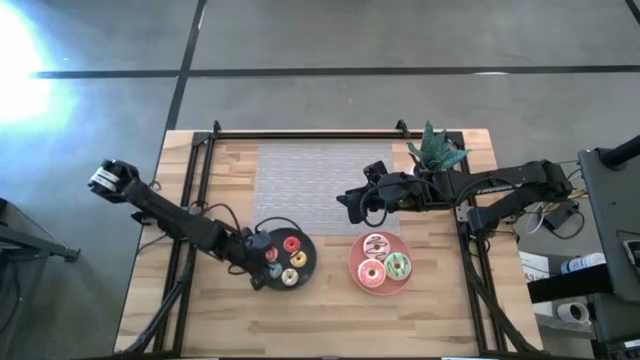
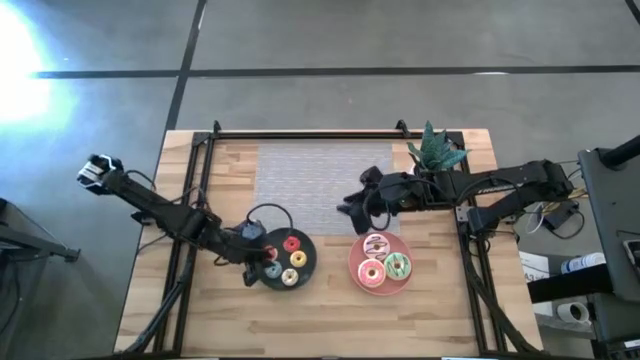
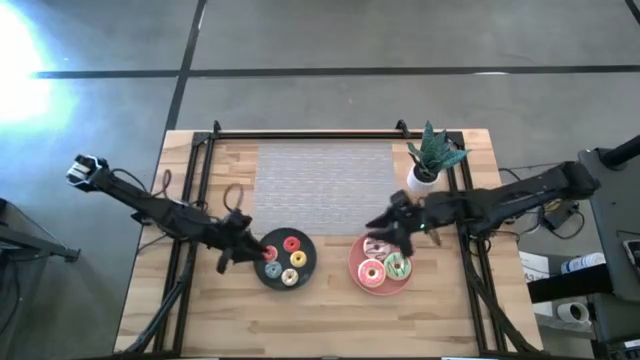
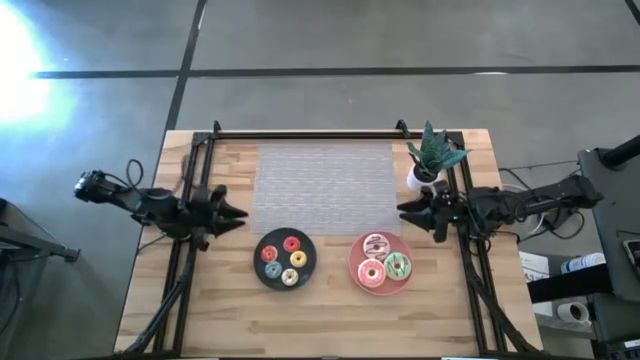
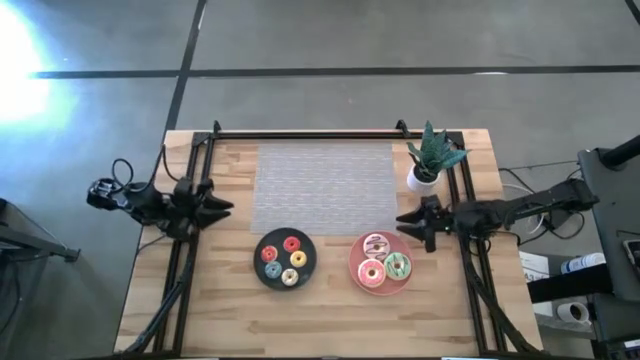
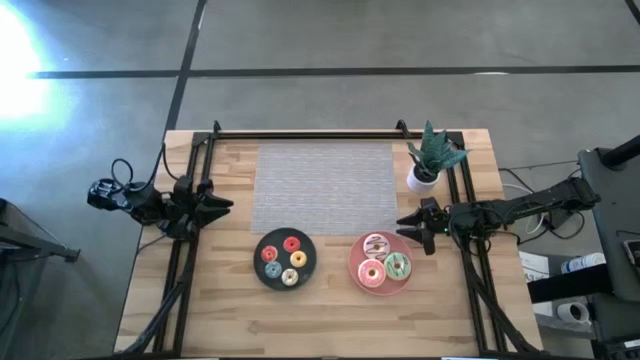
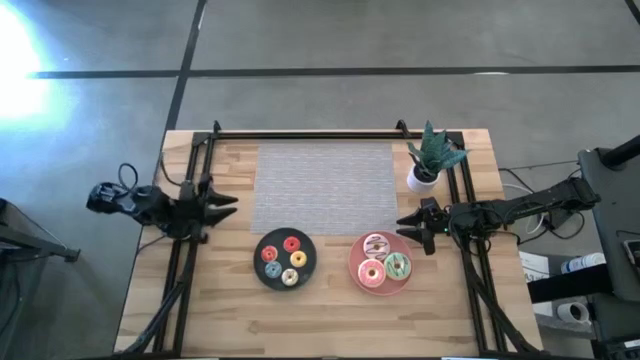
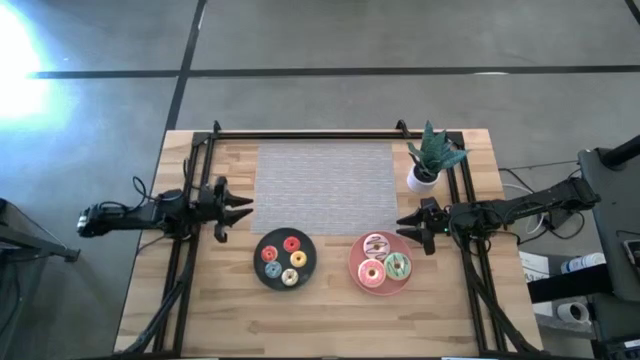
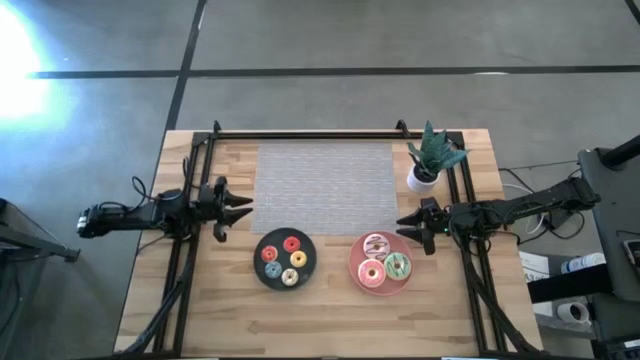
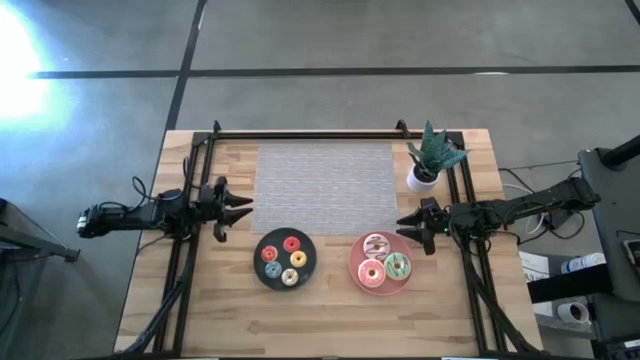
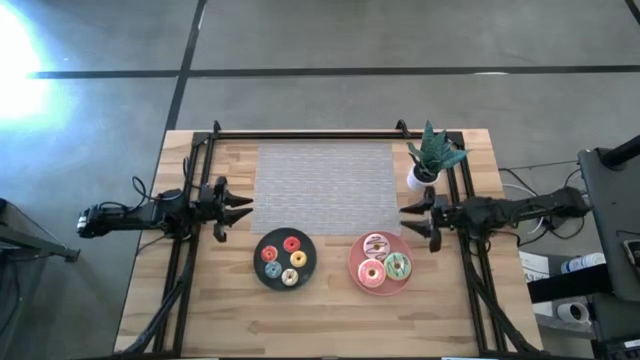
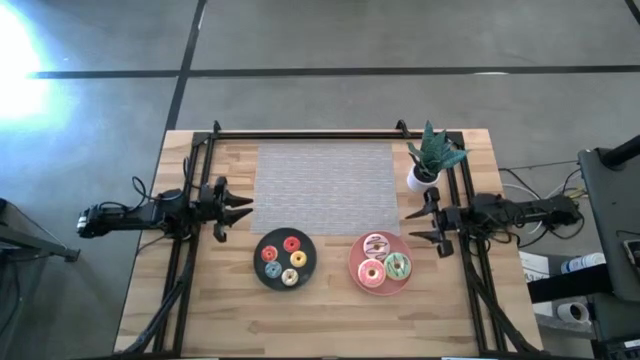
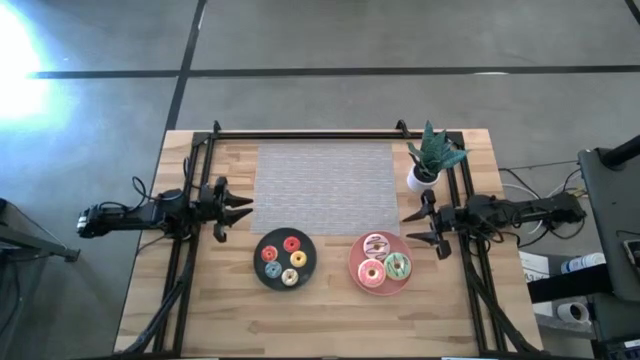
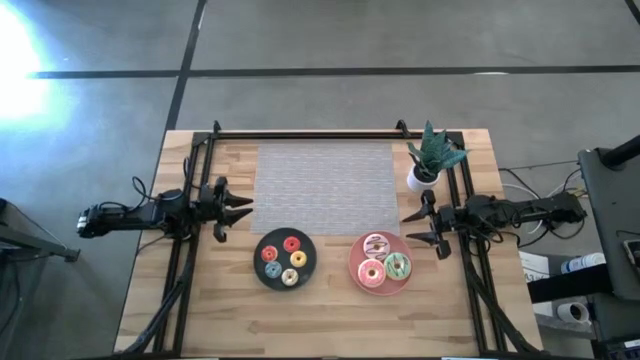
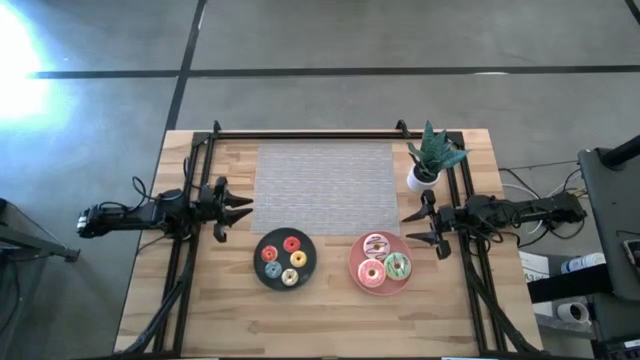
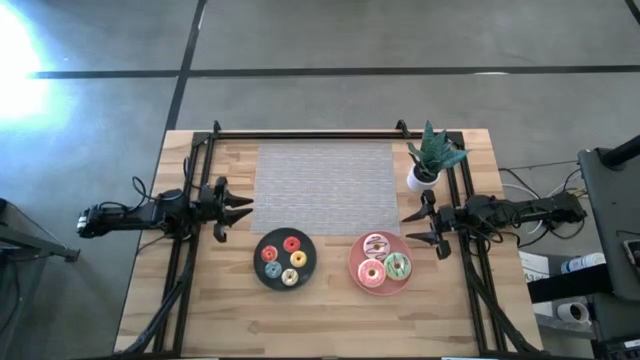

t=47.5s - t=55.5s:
Task: Pick & Place donuts
Return to Home Position

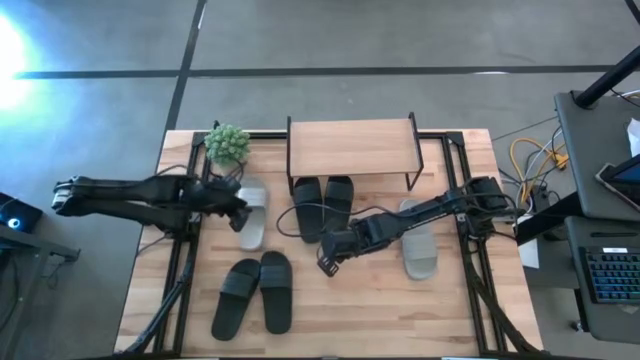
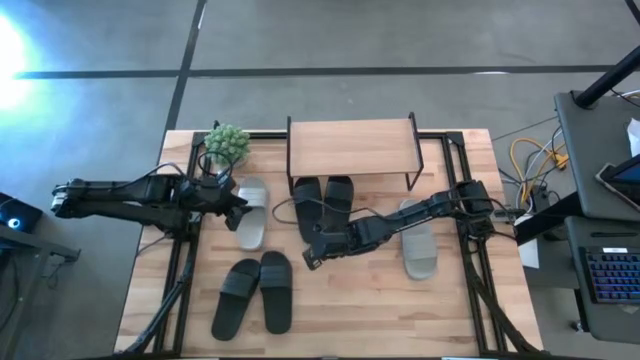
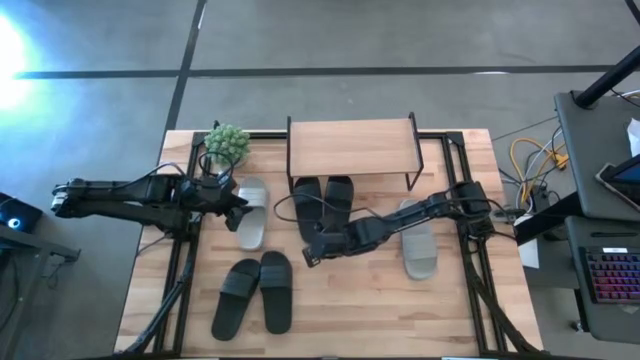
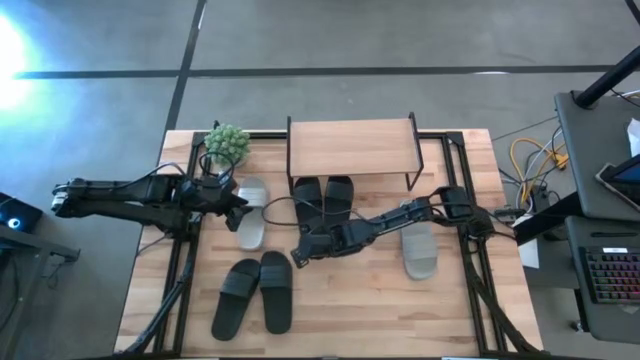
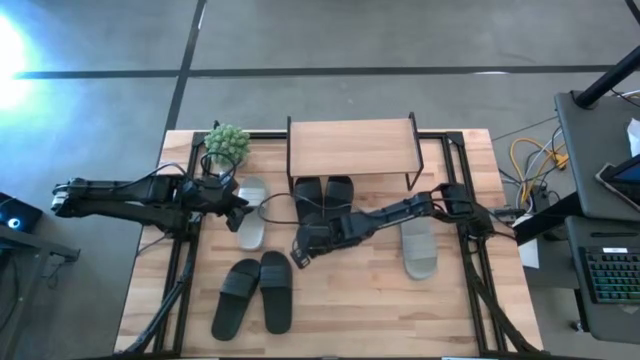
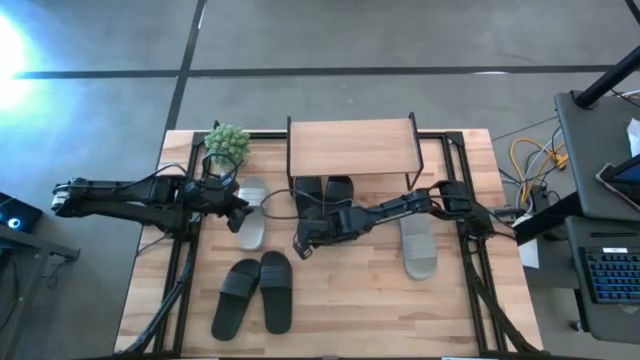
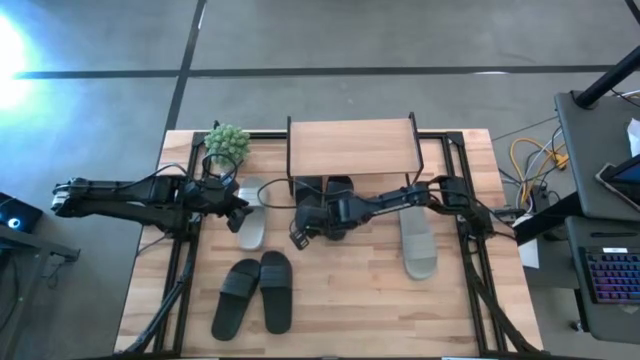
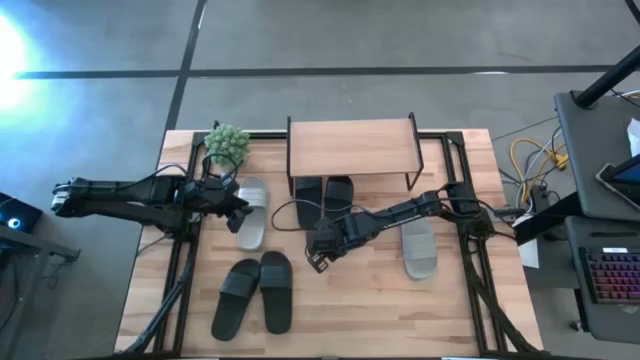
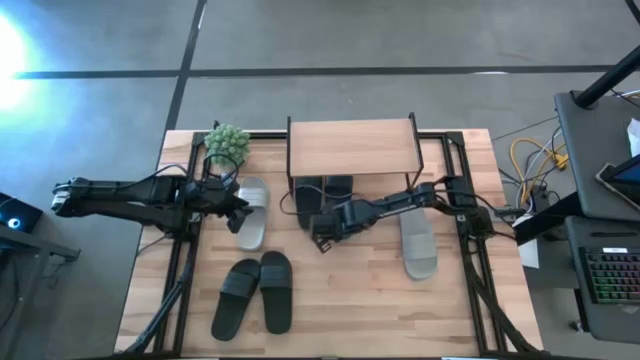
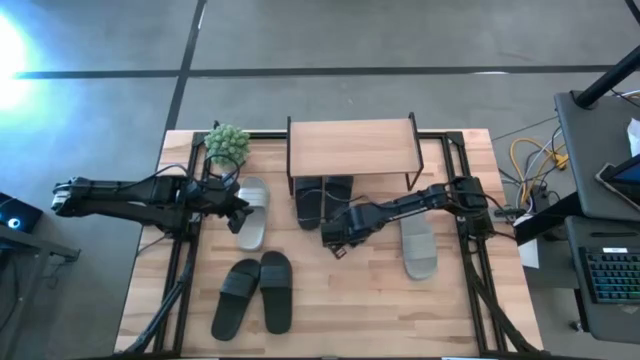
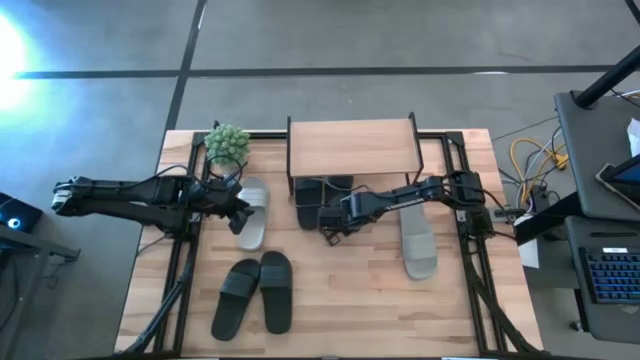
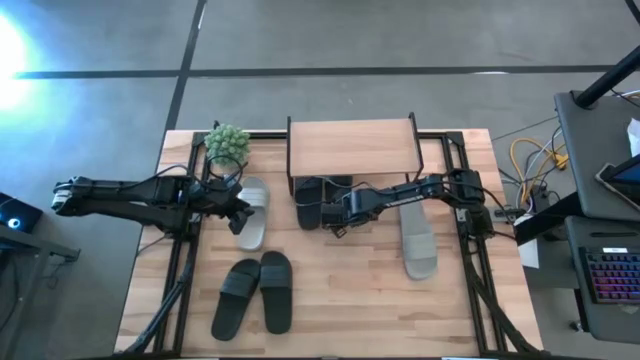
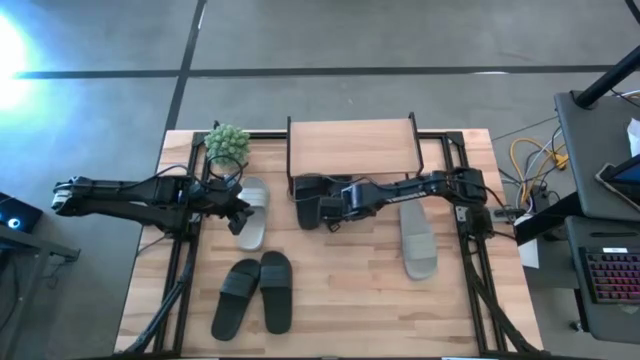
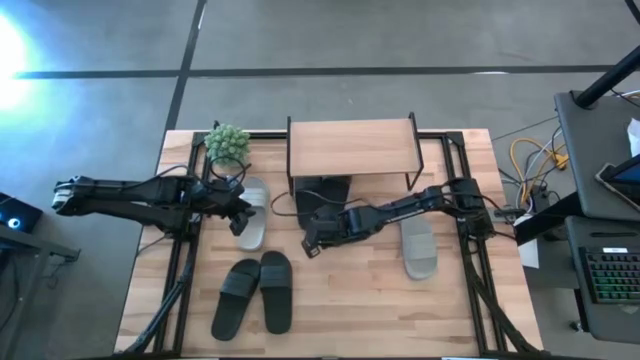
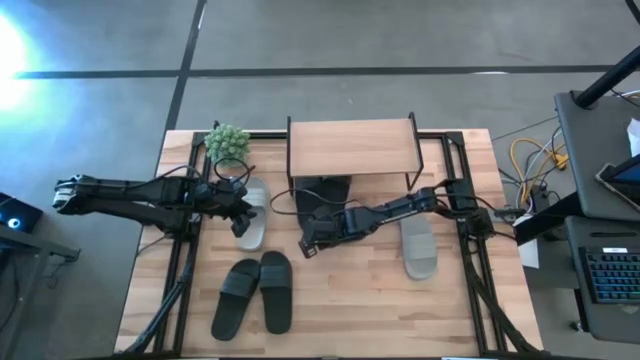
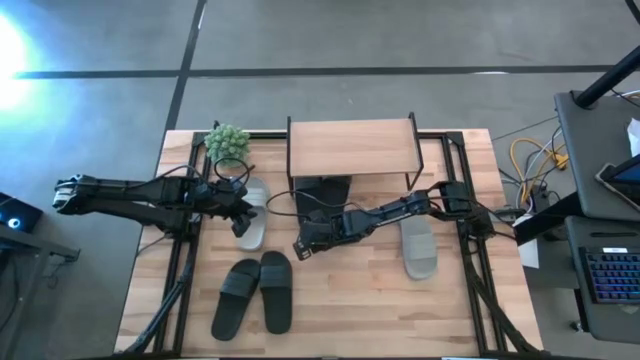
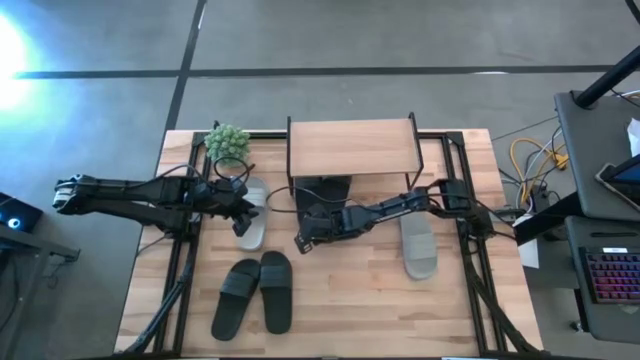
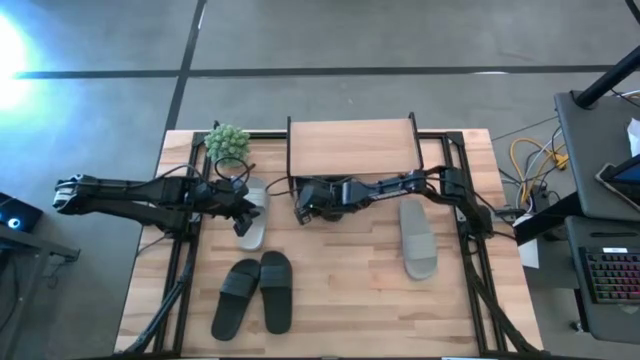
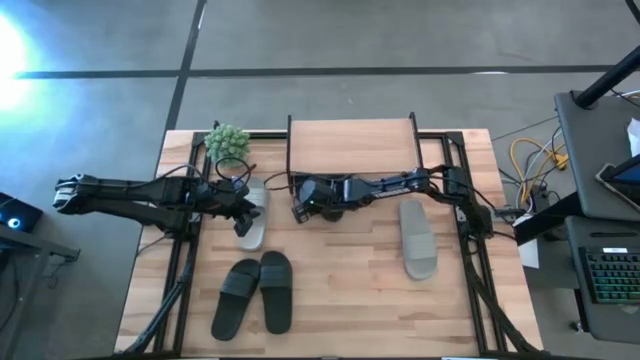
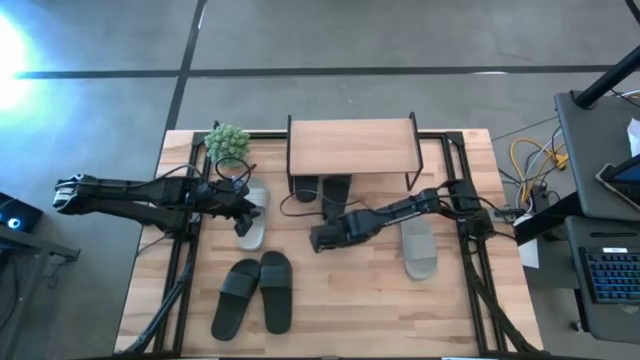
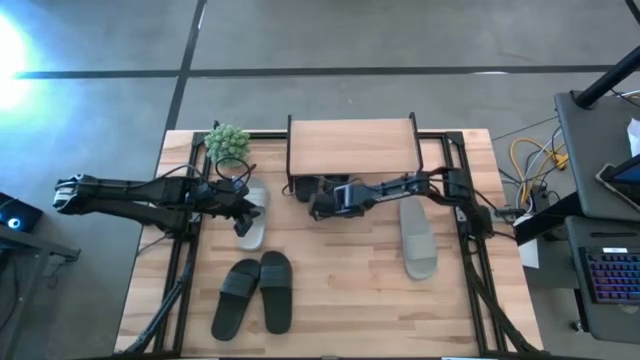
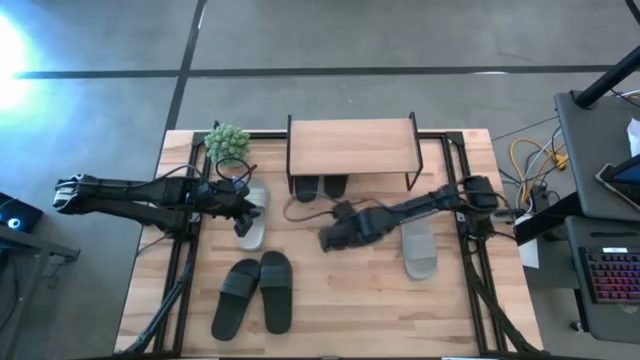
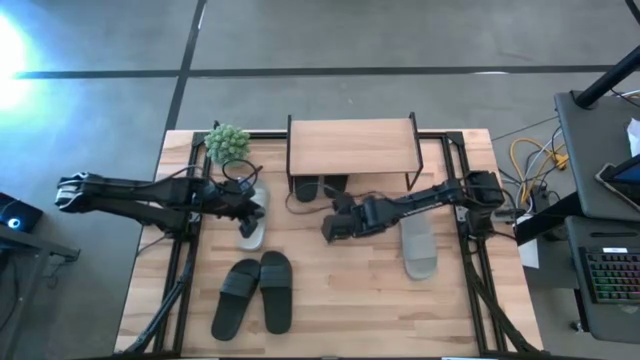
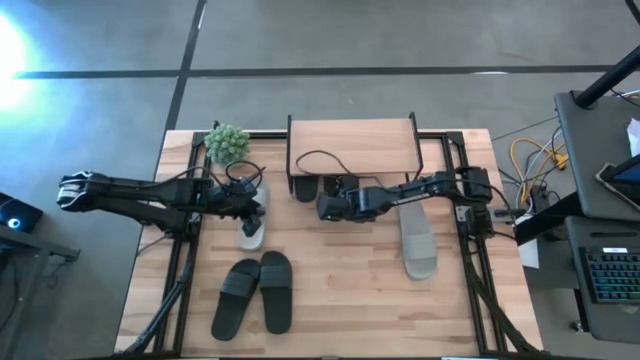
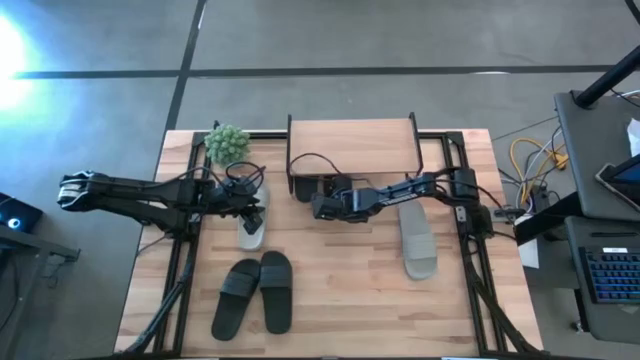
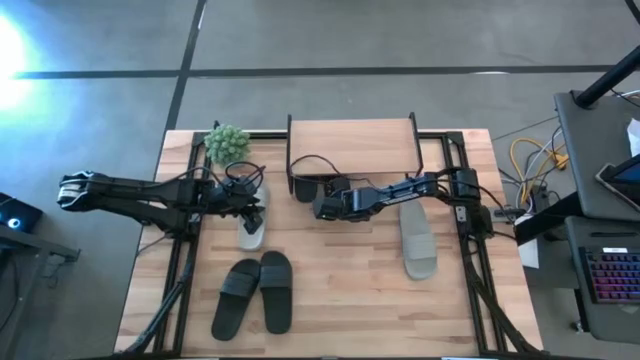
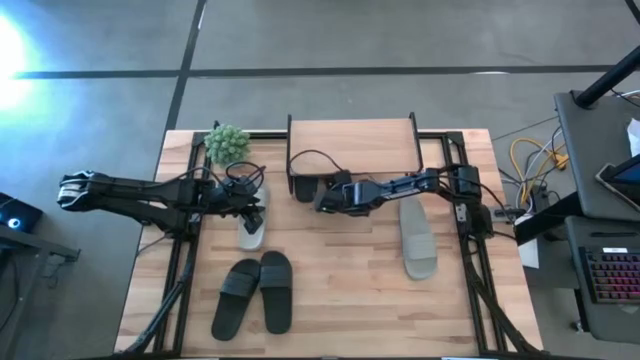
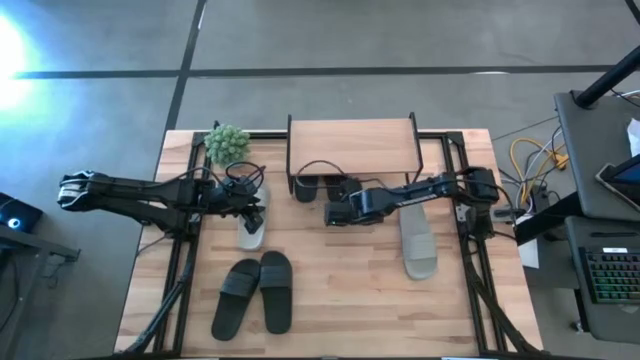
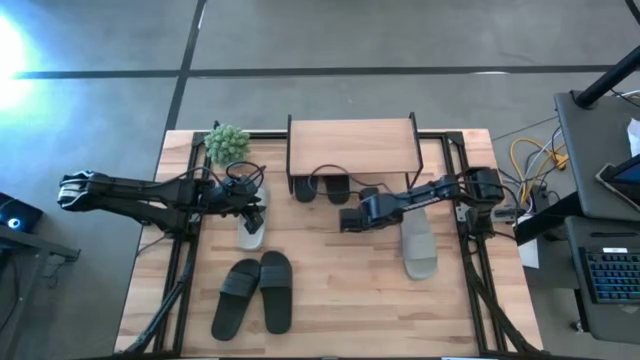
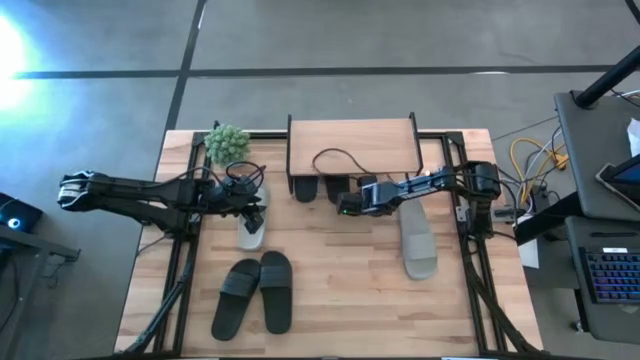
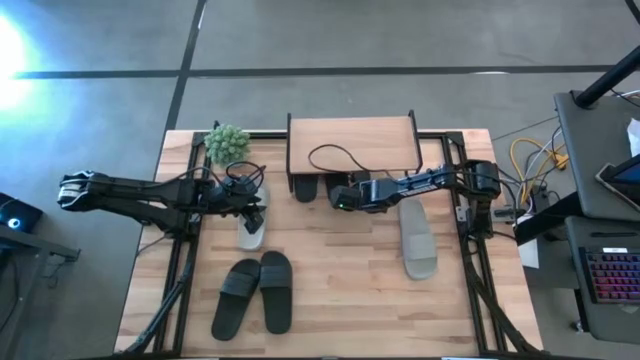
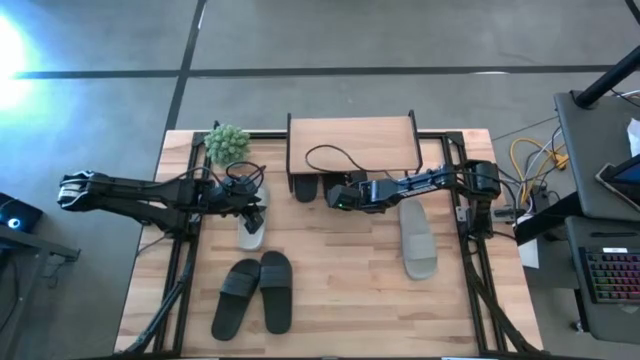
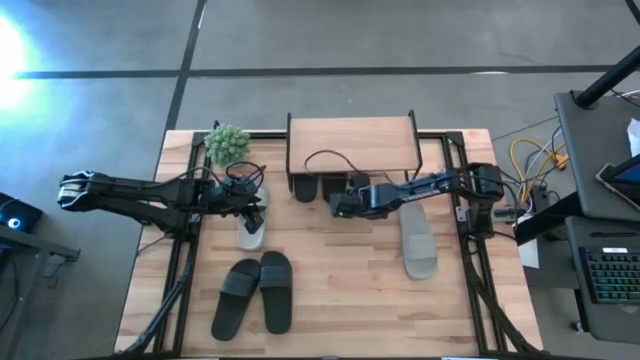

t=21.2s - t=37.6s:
Task: Pick and place slides into the shelf
Adjust the black slides under the shelf
